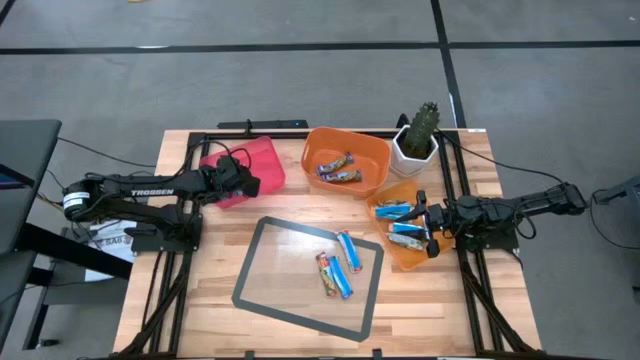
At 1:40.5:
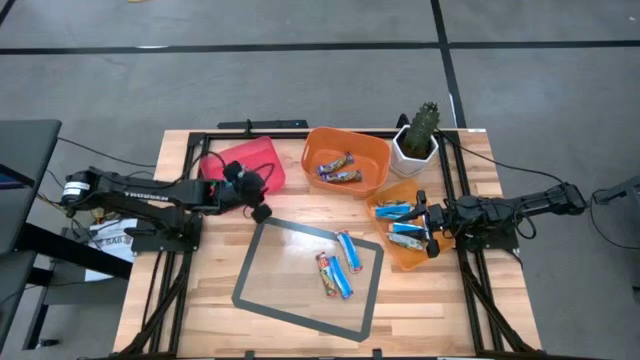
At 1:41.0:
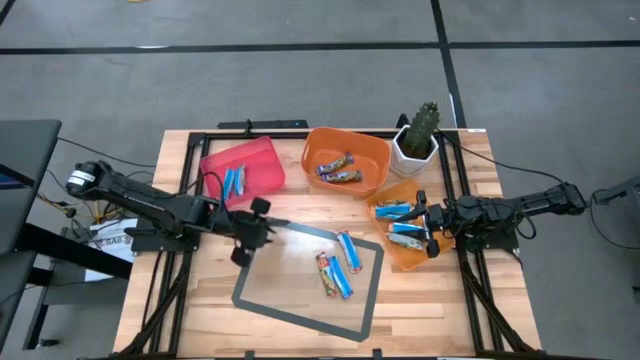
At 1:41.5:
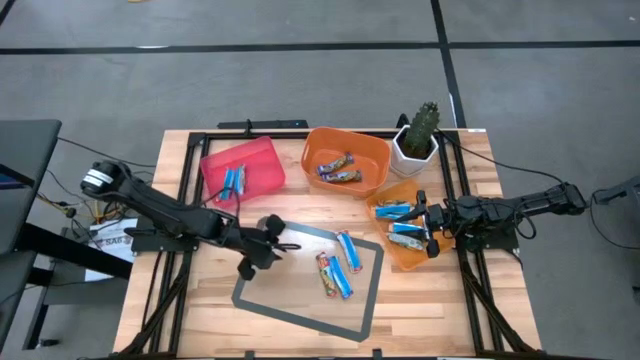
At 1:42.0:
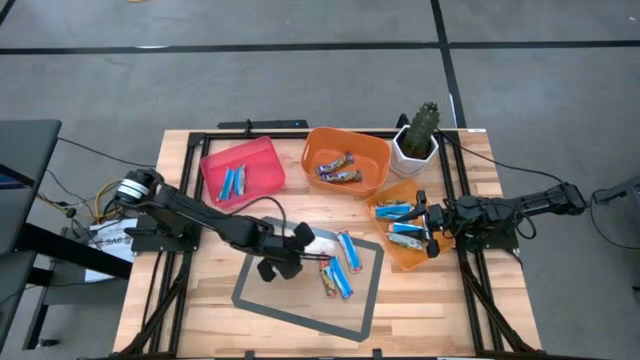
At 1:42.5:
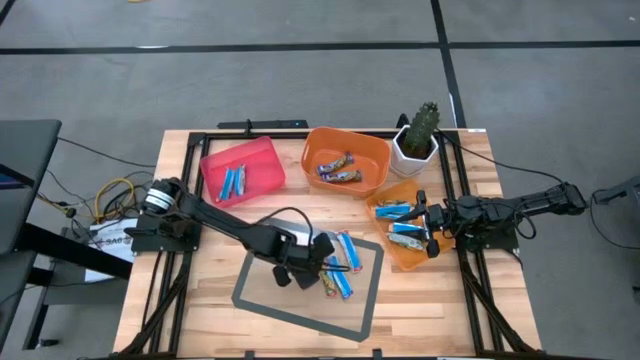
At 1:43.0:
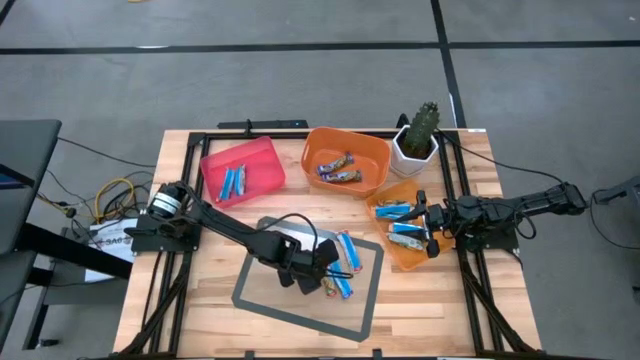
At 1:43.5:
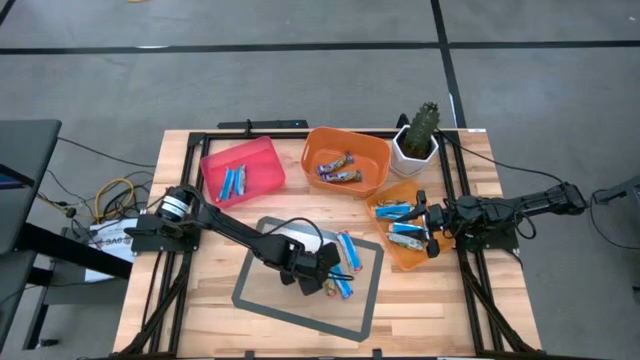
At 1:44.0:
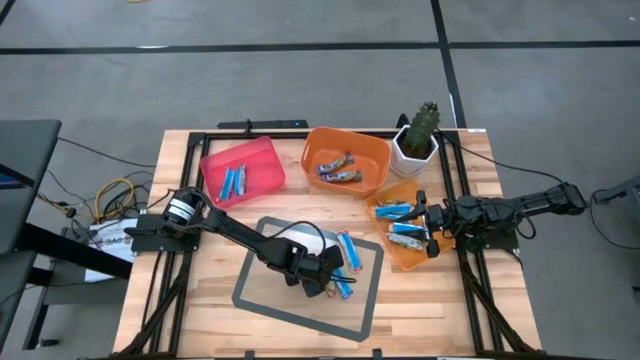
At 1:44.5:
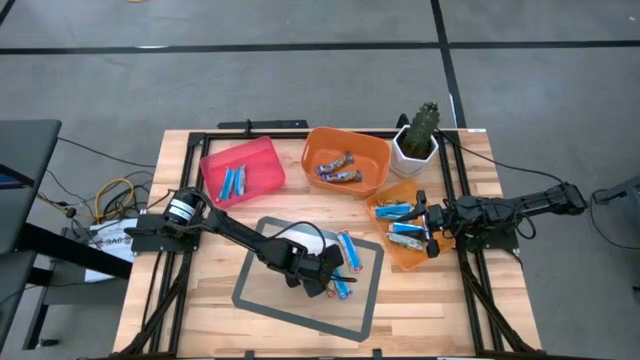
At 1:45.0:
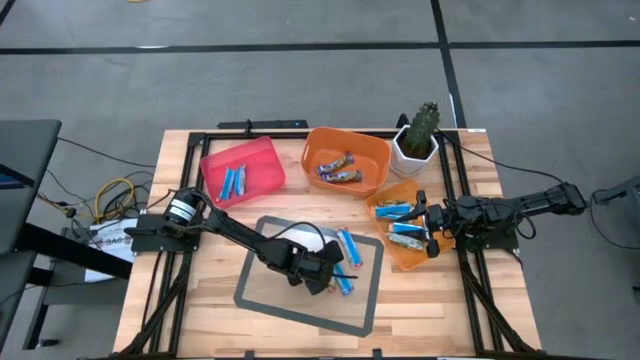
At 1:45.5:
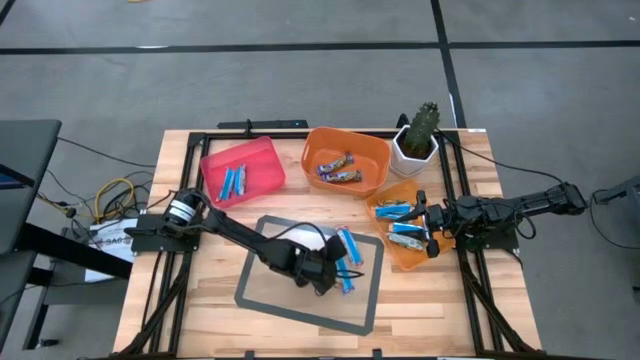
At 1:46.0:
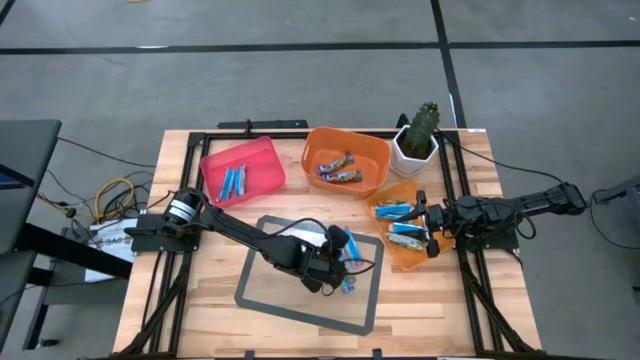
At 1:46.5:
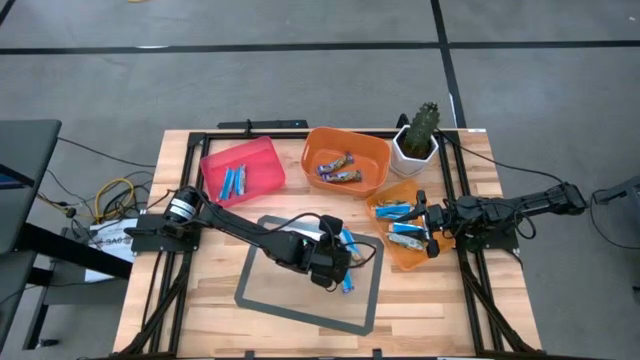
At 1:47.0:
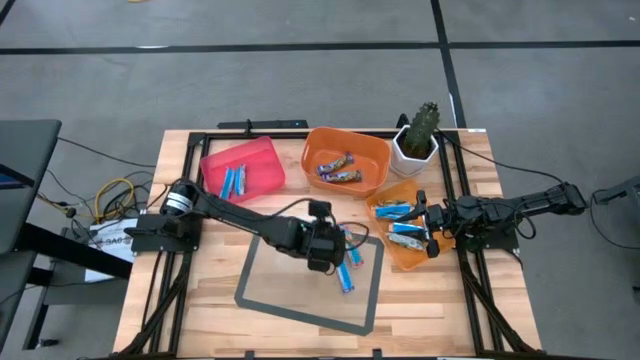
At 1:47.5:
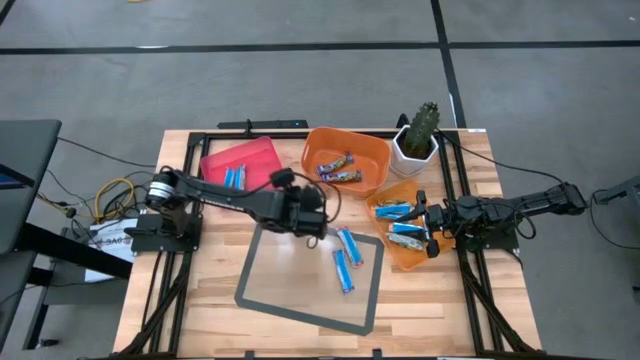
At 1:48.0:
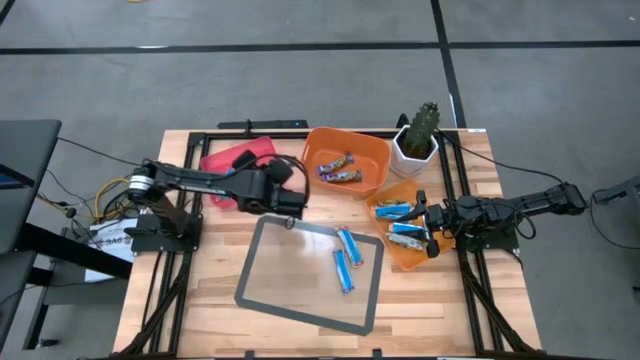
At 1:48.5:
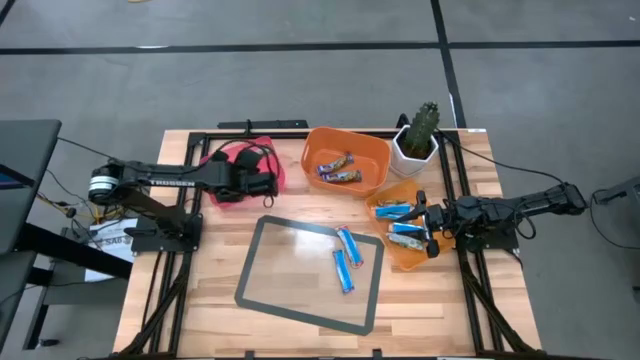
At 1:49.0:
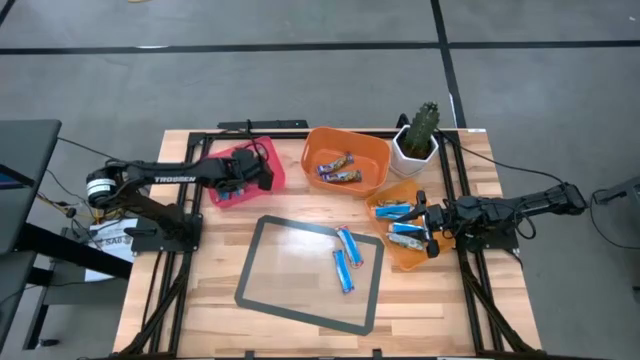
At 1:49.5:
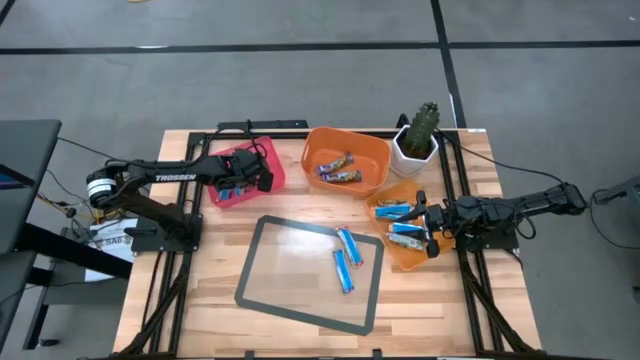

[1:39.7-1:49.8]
Task: Pick and place Granola Bars by type
Put the red granola bar into the red bin

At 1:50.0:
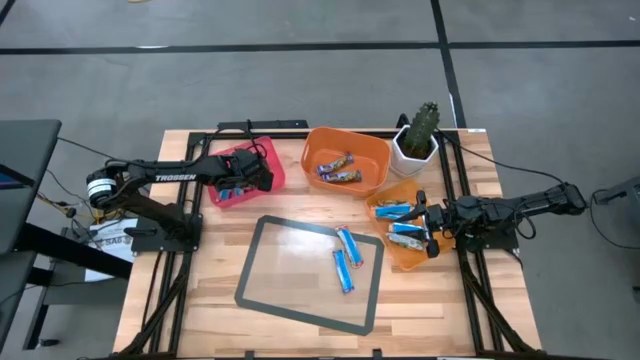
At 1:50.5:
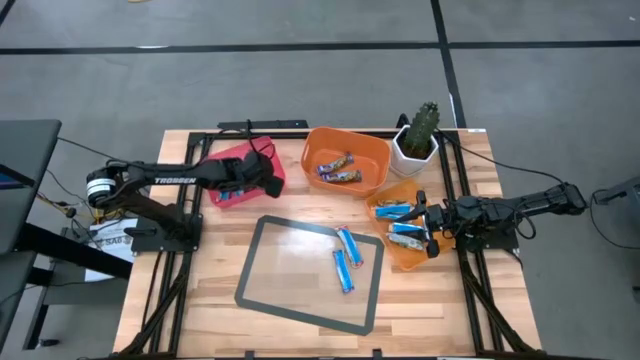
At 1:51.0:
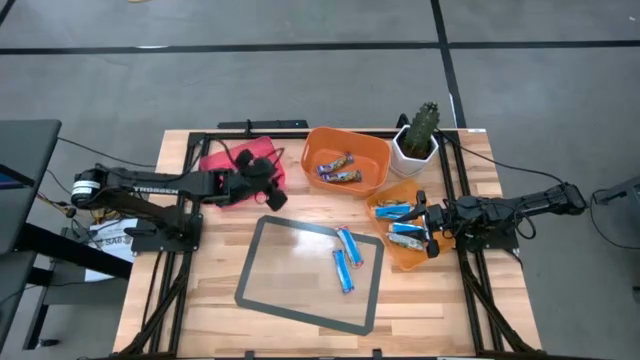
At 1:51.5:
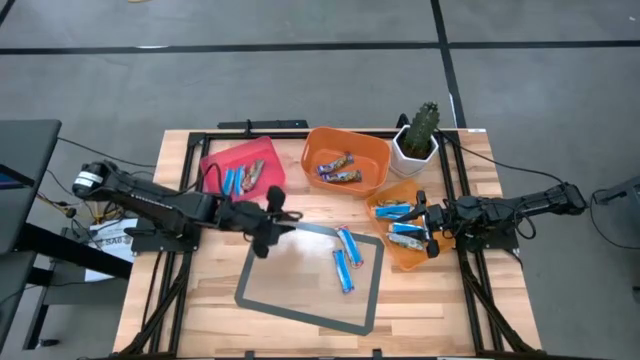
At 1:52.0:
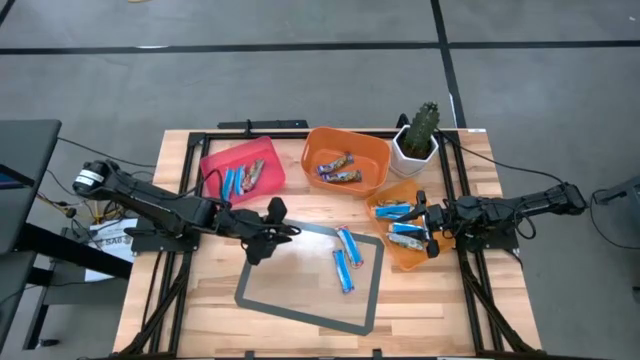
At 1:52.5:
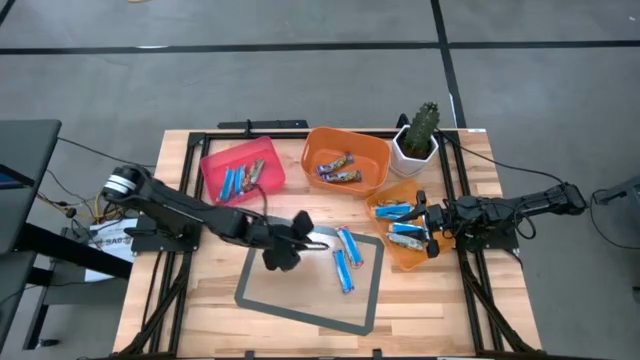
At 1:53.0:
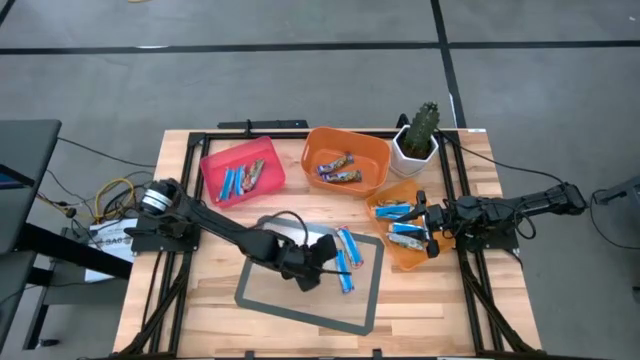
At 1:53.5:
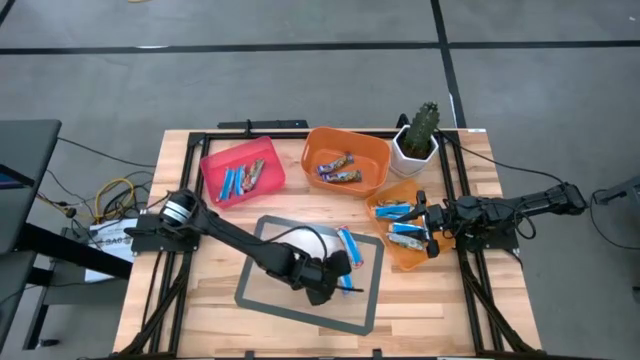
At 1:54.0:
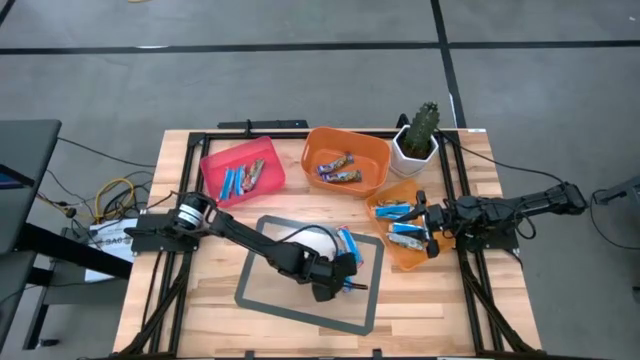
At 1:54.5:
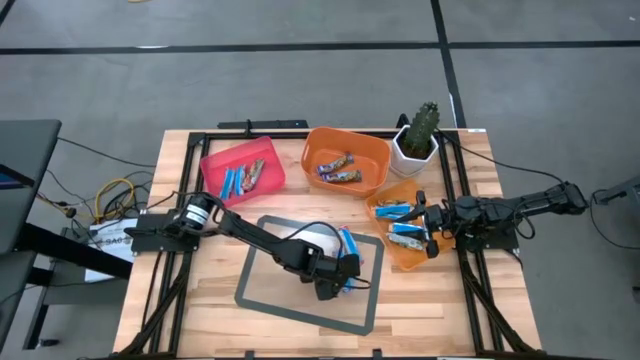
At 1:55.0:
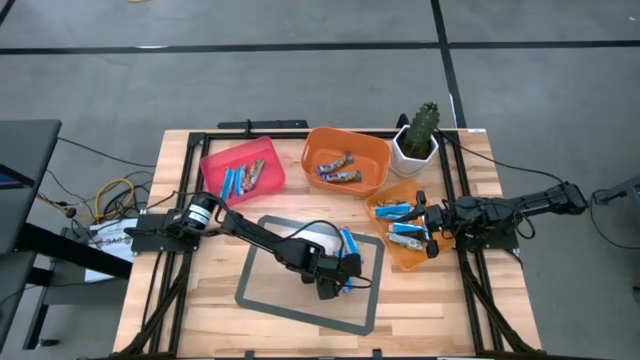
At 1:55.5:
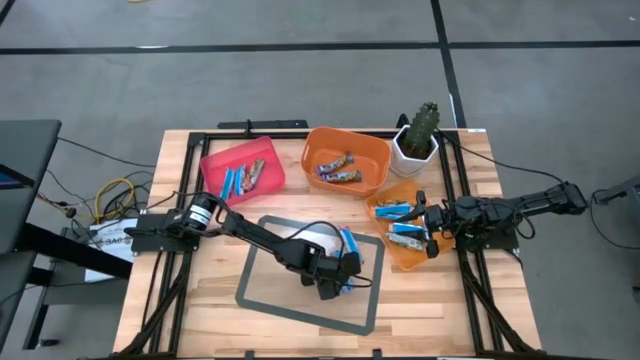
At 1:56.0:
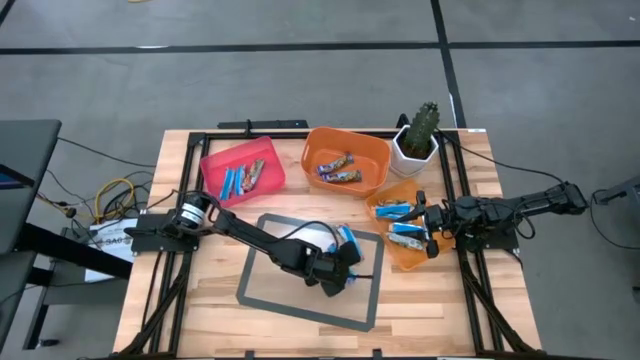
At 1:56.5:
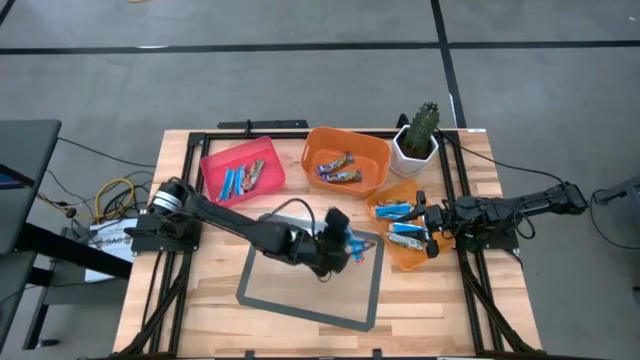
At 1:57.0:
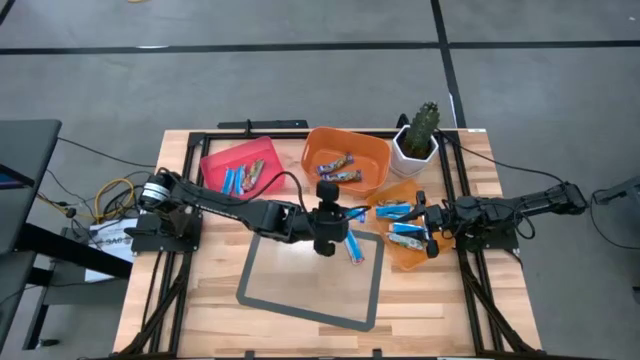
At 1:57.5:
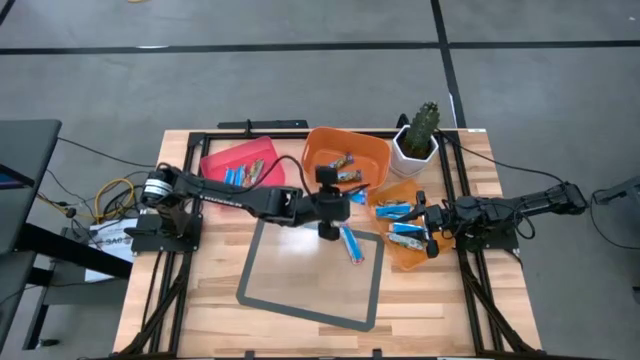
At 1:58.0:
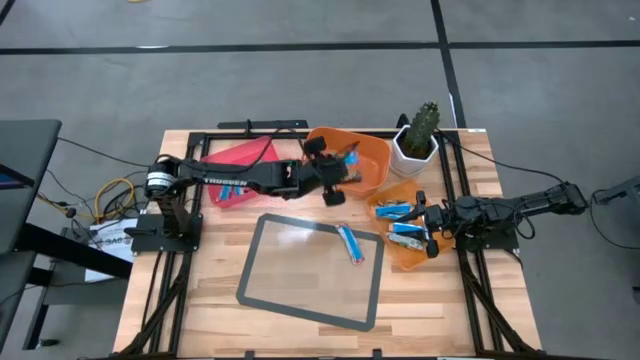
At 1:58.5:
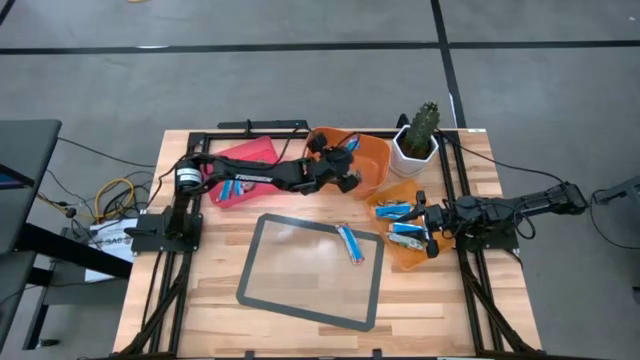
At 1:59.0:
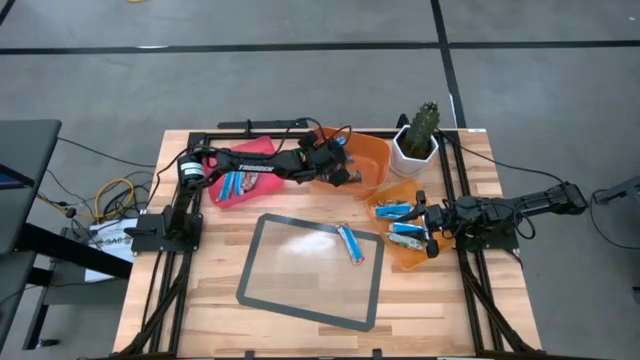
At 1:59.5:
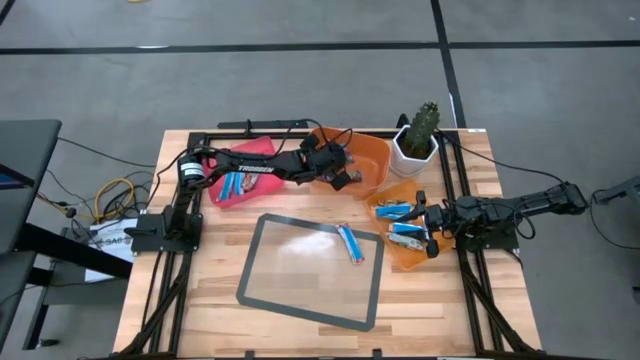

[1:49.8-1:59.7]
Put the blue granola bar into the orange bin

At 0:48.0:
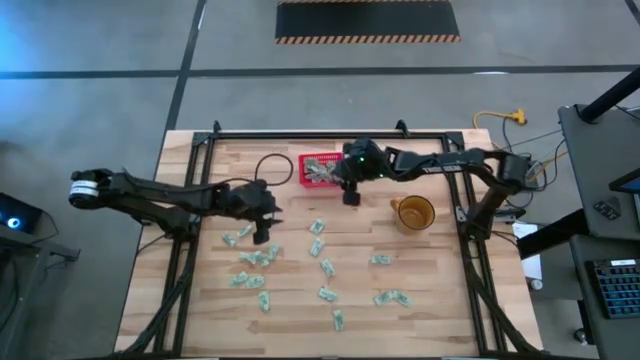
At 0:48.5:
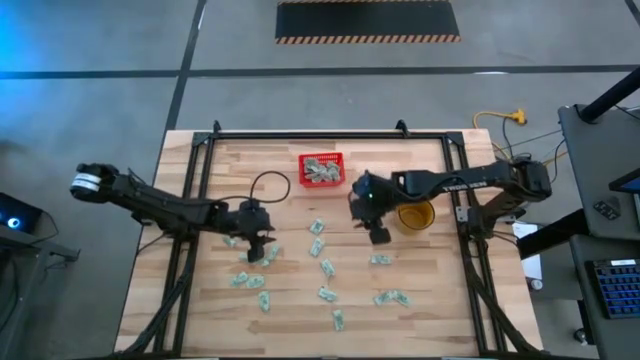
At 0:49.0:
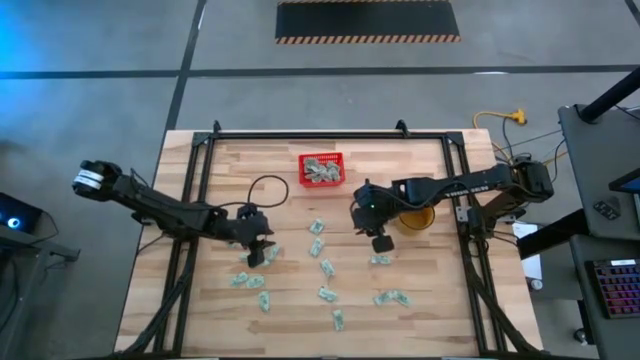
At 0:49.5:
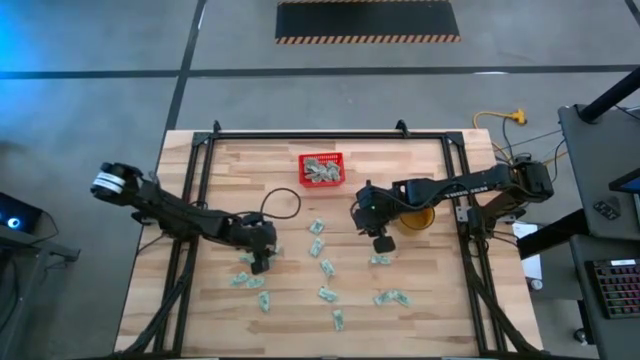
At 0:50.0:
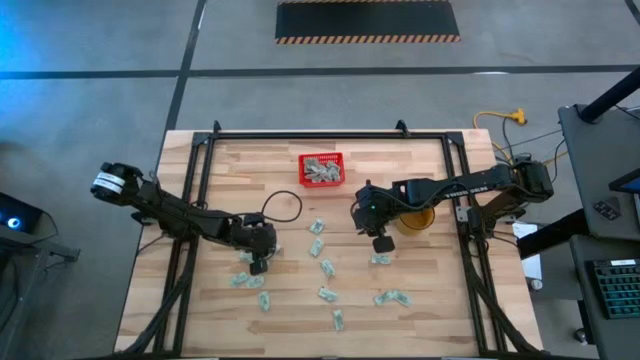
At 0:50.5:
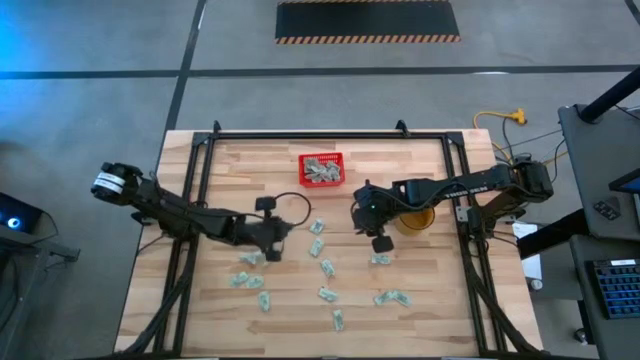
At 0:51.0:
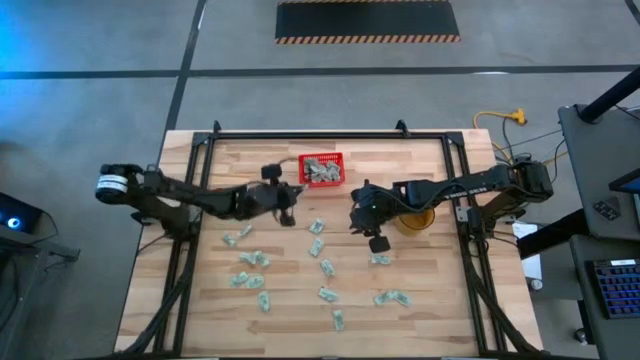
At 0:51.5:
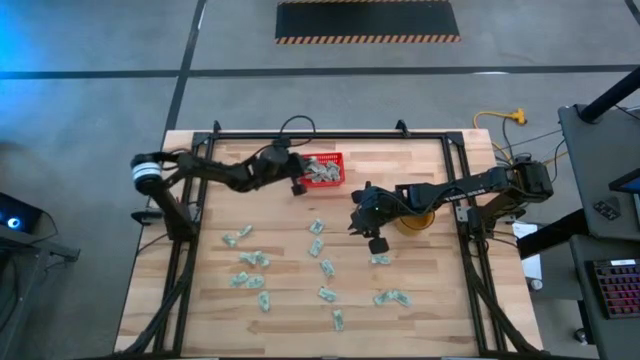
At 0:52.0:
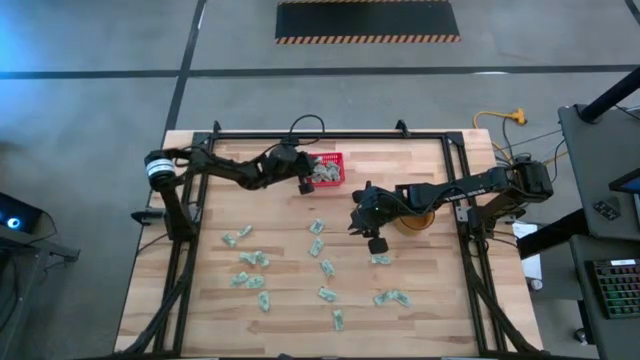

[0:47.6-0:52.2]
Task: Pick and place Stevia / Truvia into bins
Put the white stevia packet into the red bin
